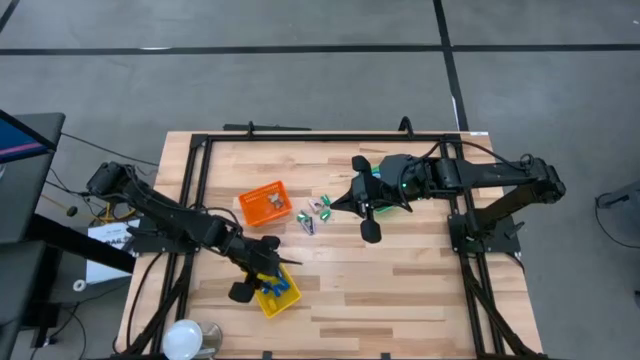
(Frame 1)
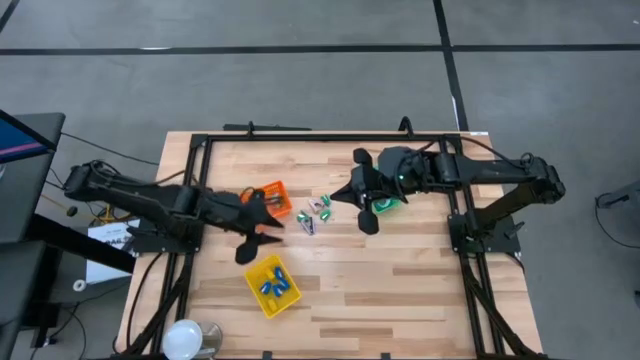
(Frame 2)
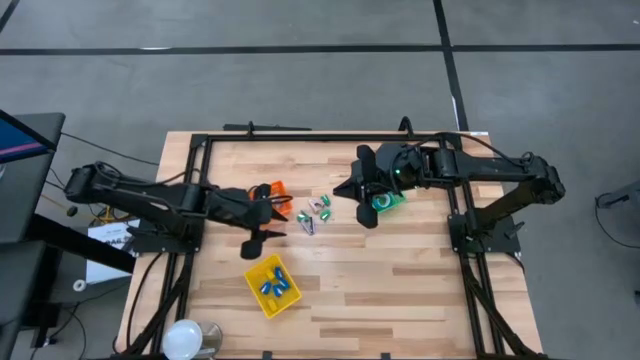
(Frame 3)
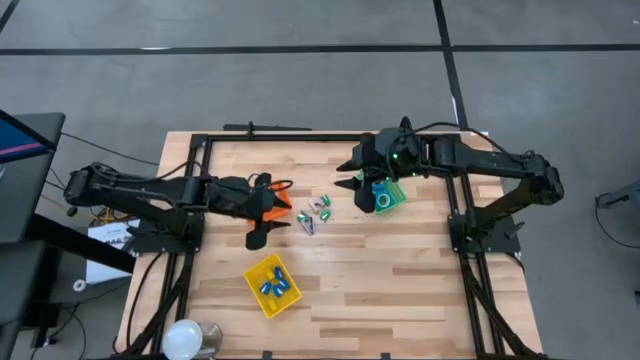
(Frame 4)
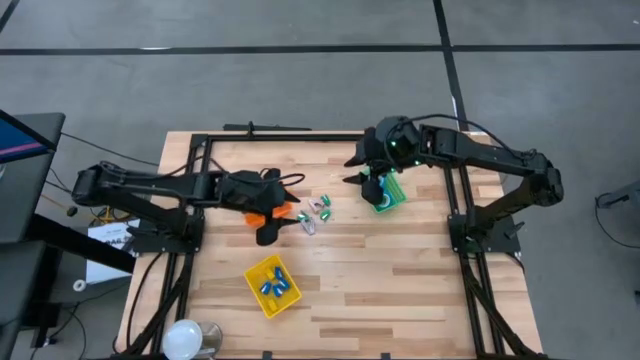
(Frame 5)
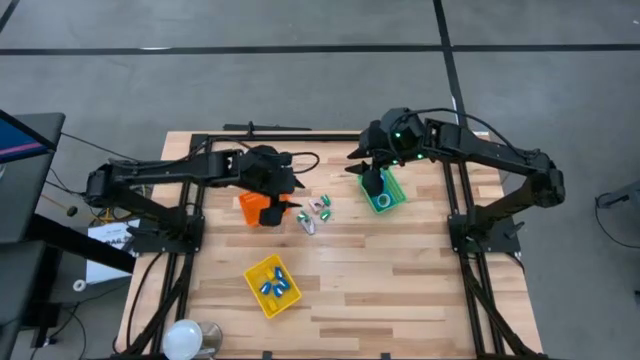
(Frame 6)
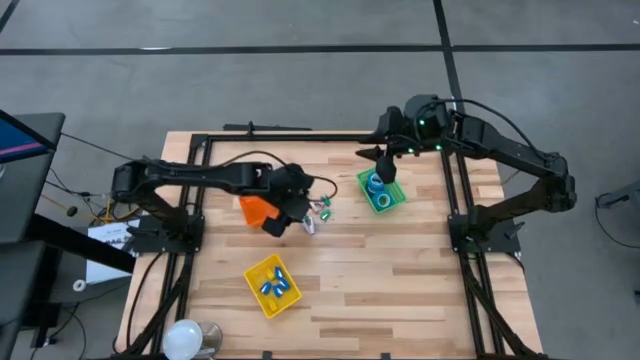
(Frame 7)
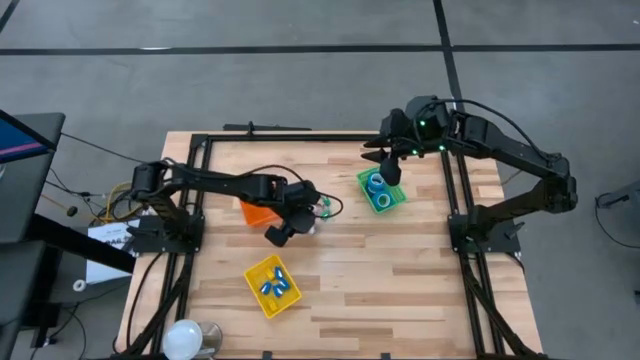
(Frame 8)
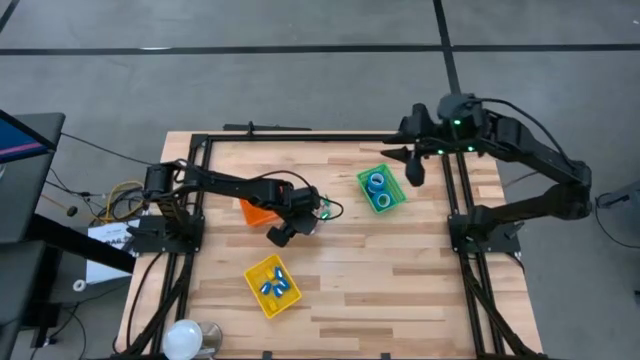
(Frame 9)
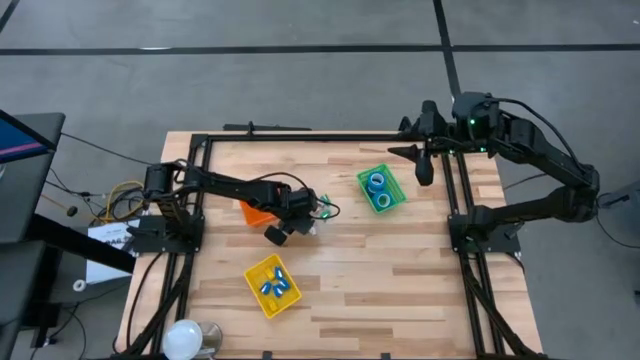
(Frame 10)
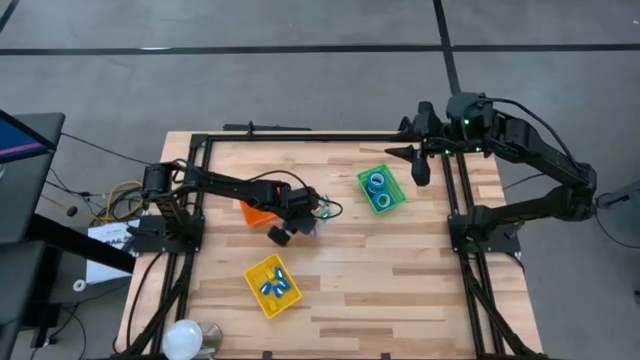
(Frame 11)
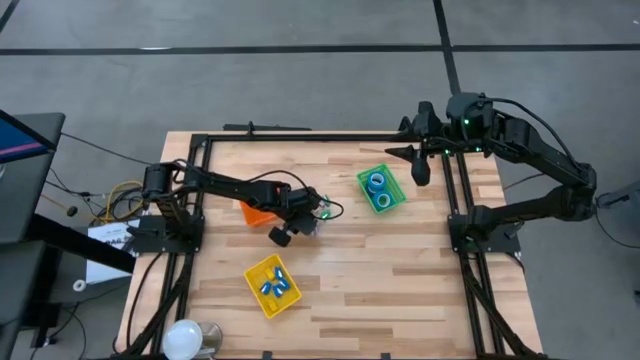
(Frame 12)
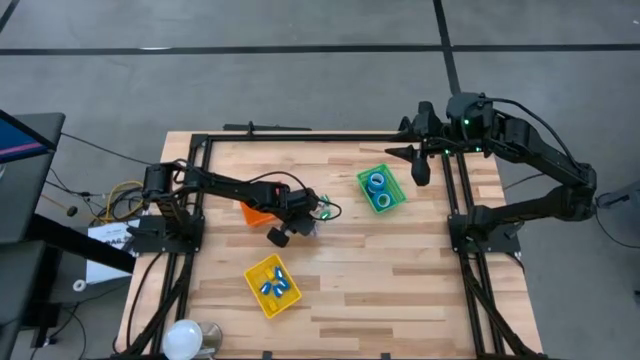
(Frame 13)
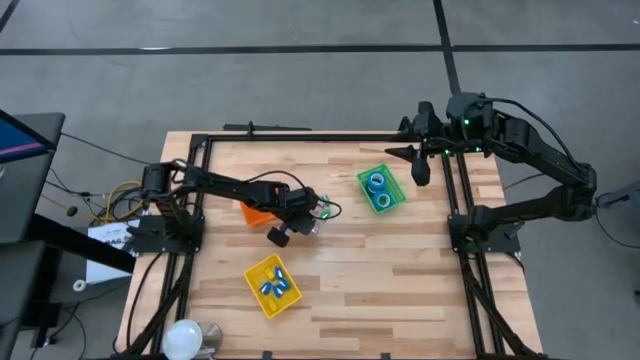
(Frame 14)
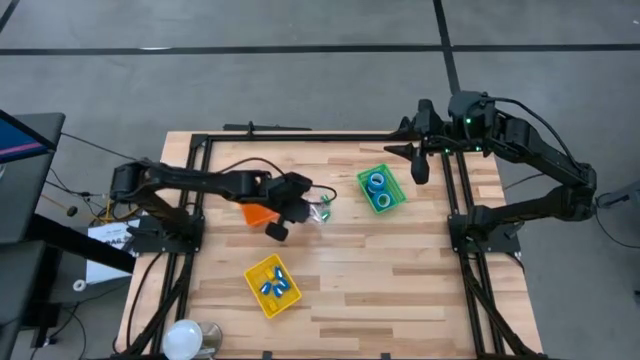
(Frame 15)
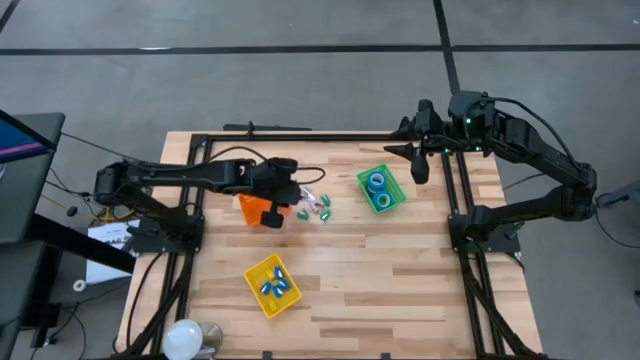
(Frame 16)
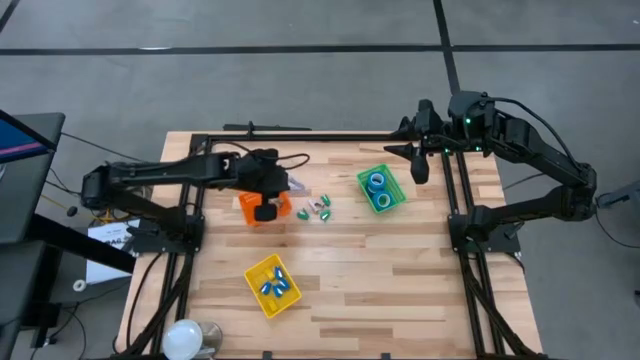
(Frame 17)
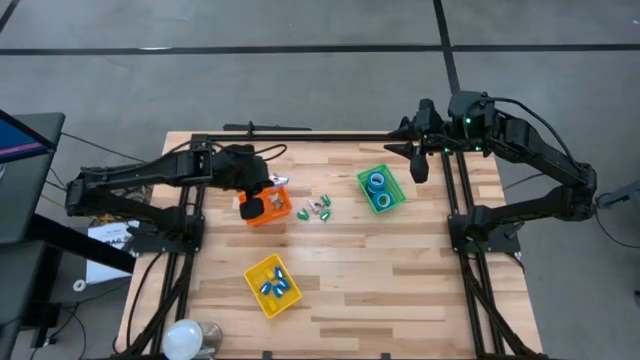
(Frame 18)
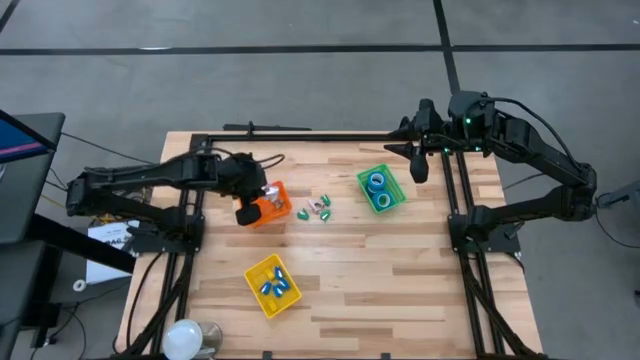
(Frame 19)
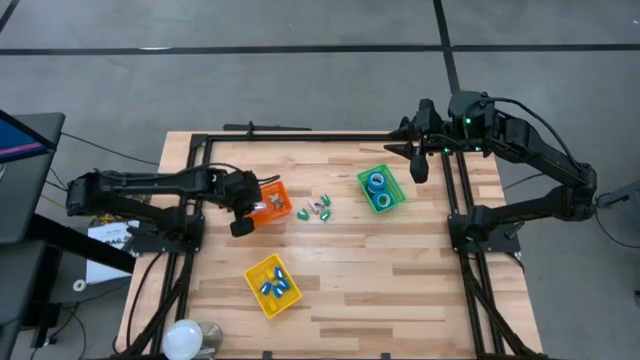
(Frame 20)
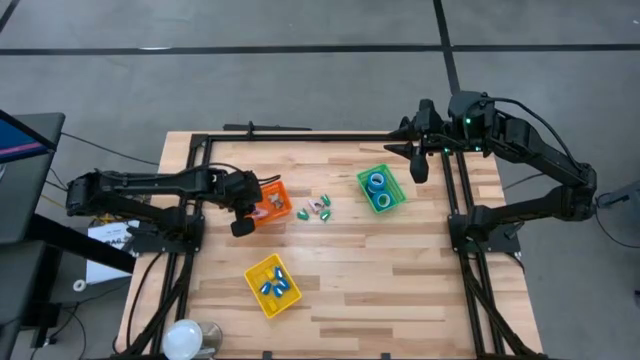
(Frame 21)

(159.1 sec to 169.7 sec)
Task: Pick and place Stapler, Stapler remover, tape
Put the purple staple remover into the orange basket

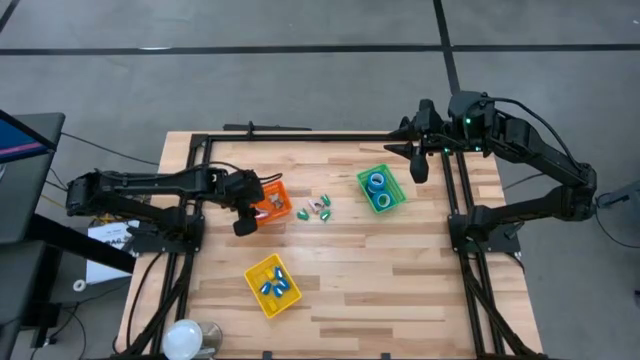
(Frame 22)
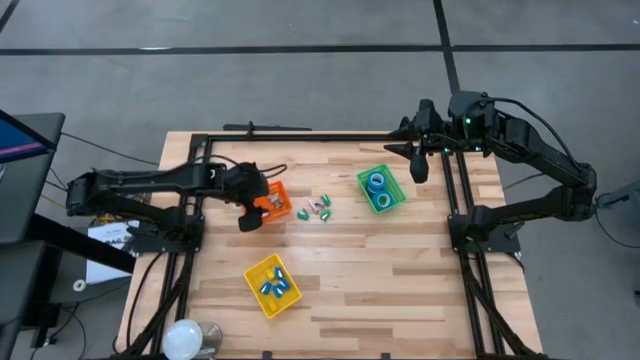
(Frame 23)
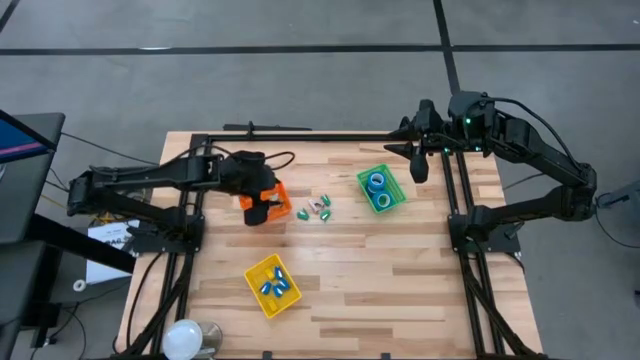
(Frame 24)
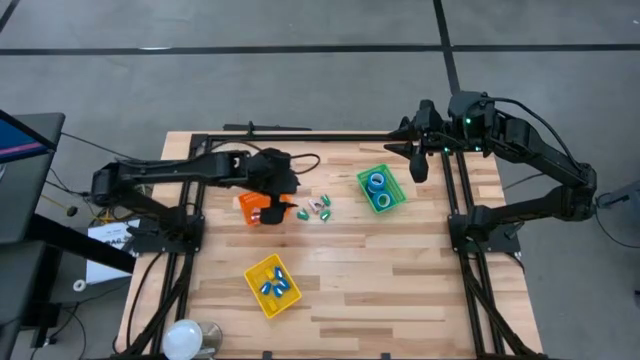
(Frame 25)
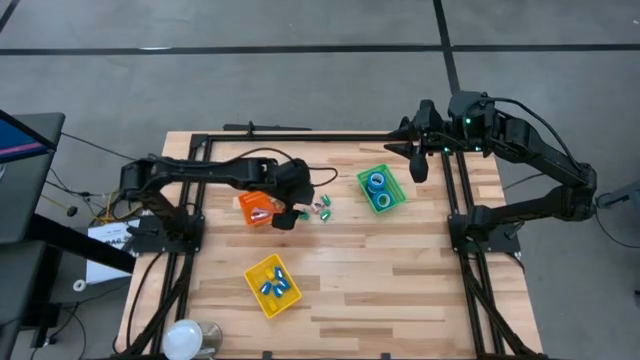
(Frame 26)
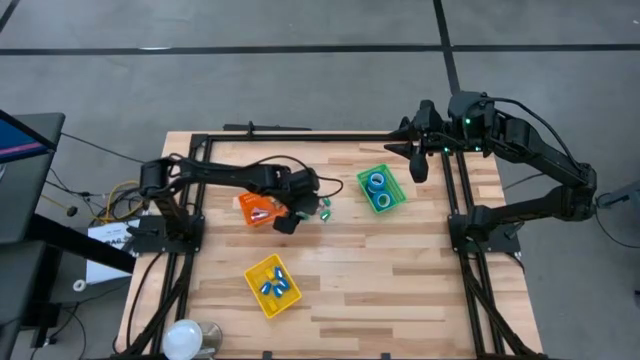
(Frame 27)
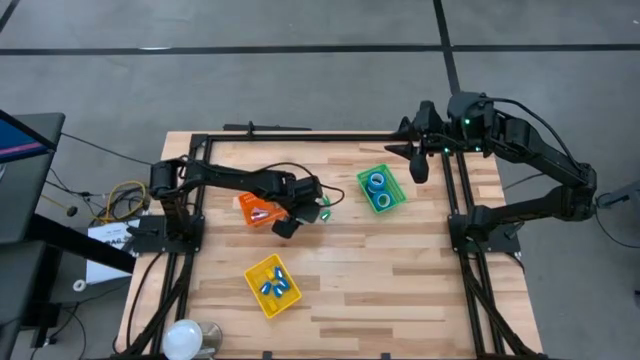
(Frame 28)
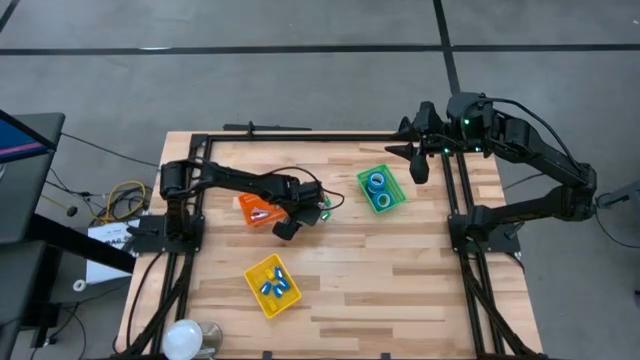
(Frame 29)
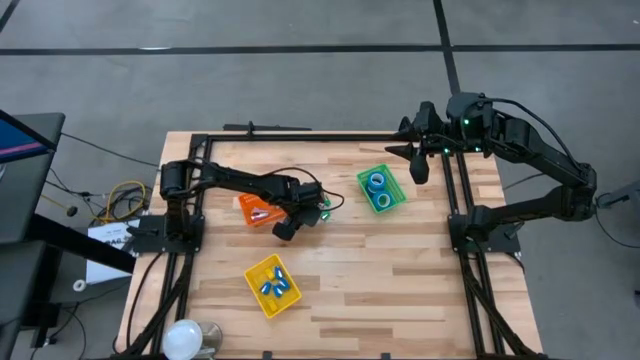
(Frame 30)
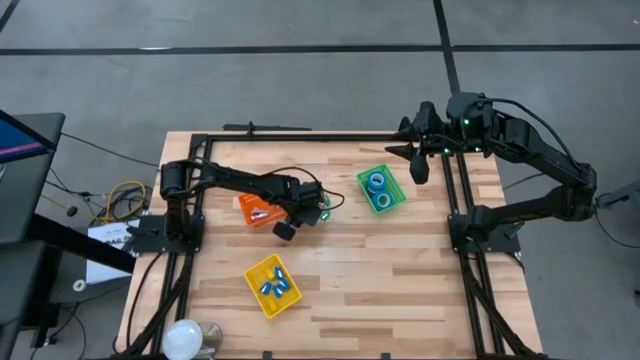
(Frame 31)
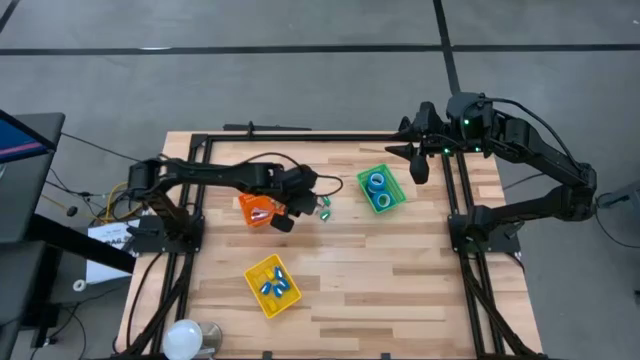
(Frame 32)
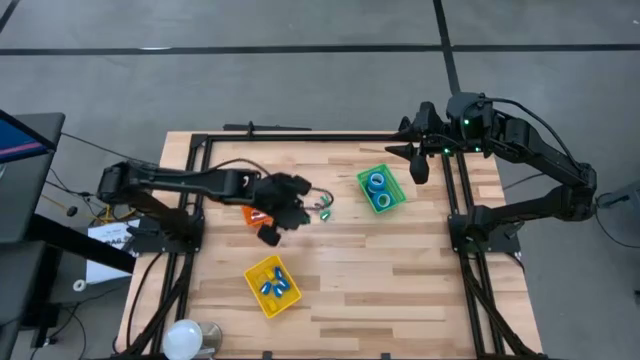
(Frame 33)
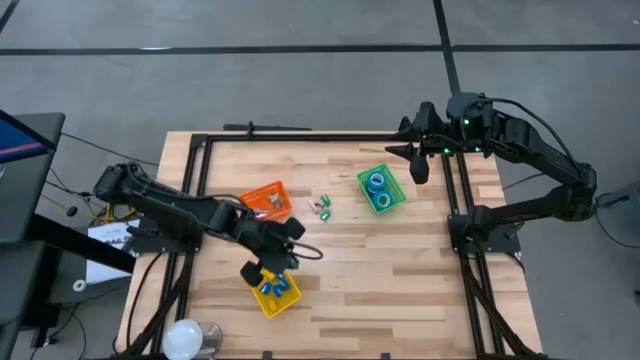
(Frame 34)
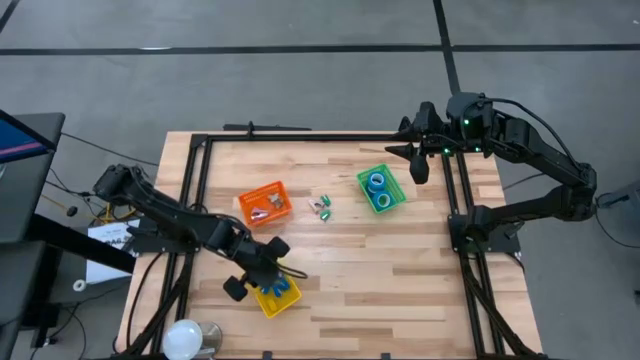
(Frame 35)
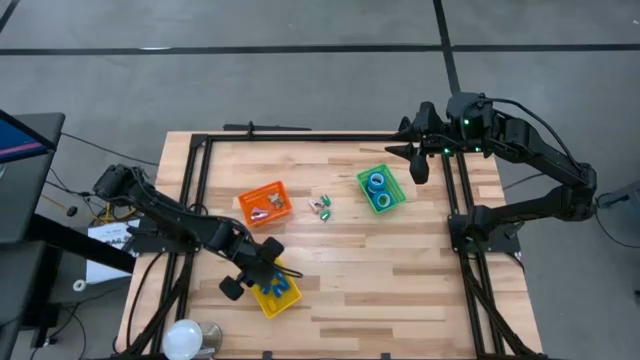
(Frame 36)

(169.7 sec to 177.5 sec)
Put the green stapler into the yellow basket

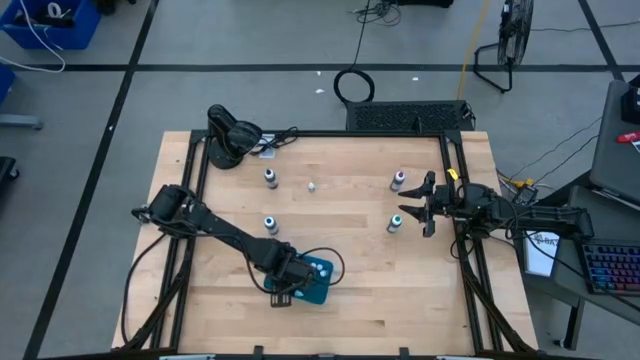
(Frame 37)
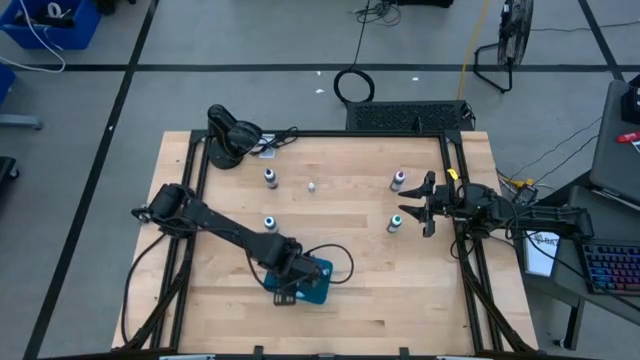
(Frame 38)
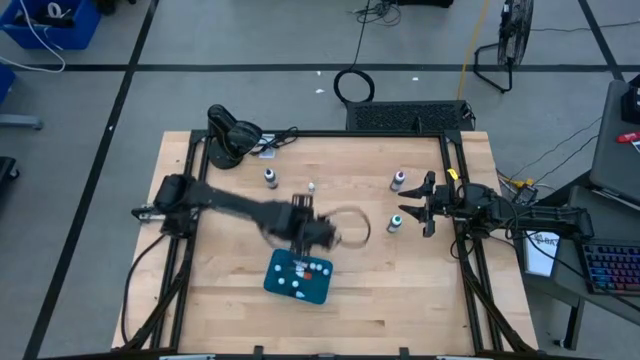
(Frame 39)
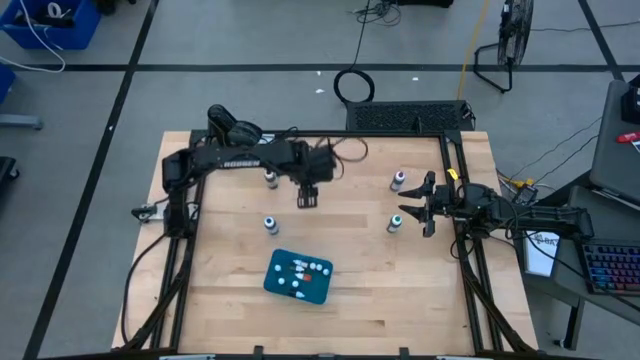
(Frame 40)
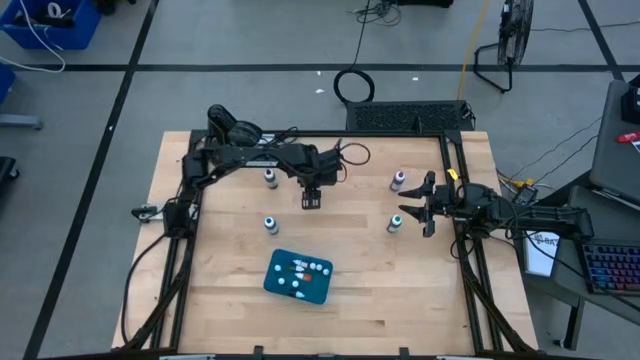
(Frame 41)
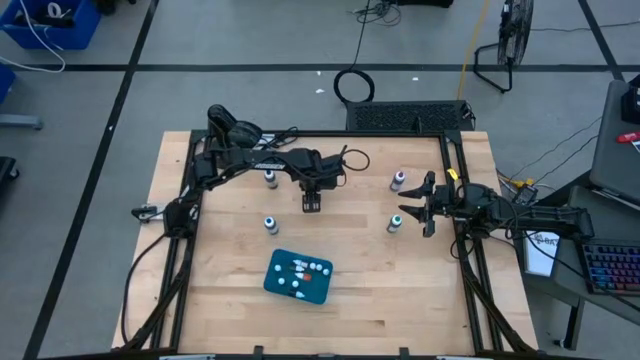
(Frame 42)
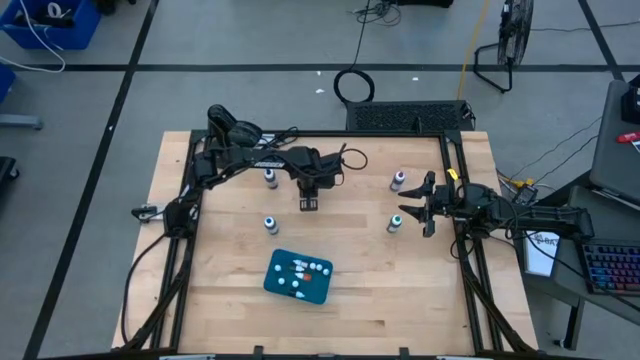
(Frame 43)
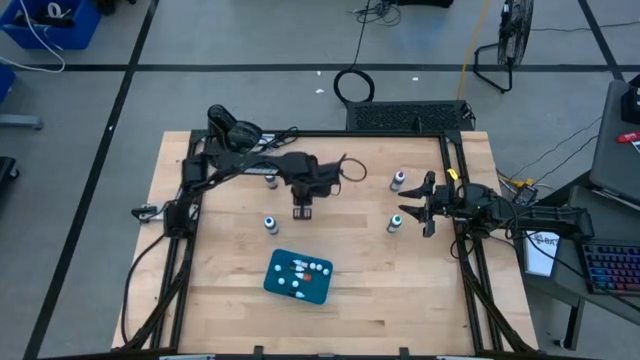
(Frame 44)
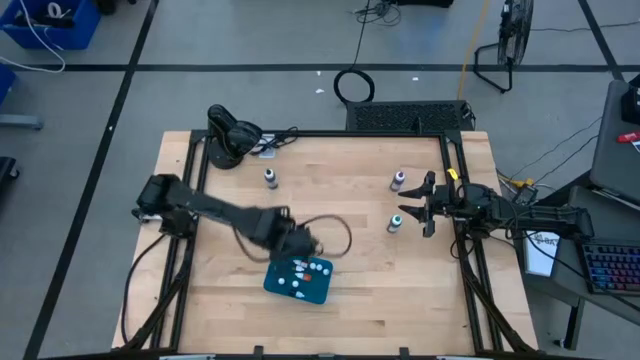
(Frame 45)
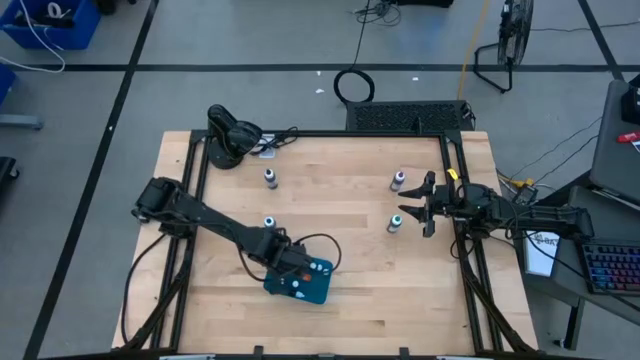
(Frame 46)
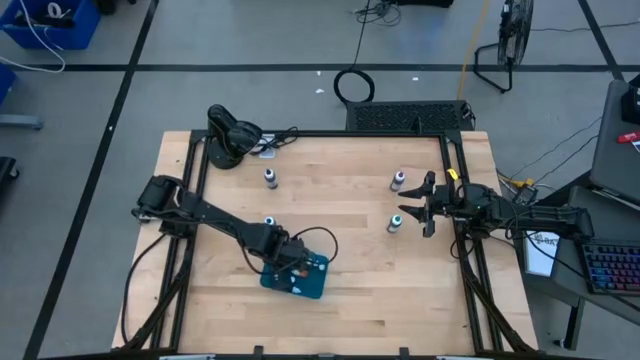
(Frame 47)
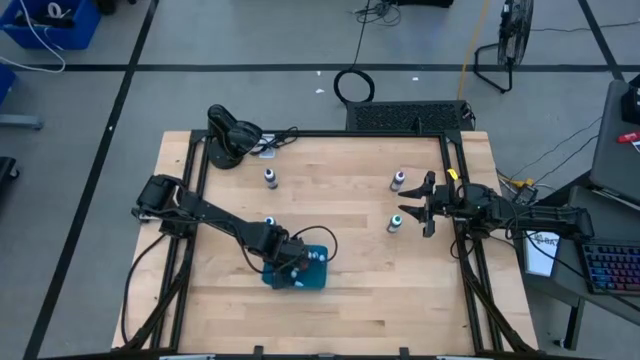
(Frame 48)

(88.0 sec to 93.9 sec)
Task: Pick & Place food coloring
Put the small purple coloring bottle into the blue bin
